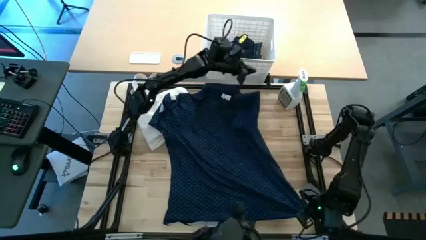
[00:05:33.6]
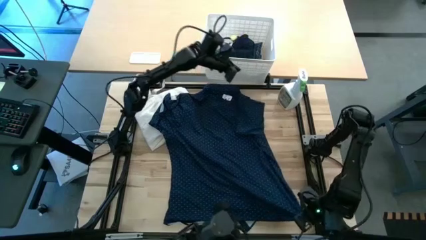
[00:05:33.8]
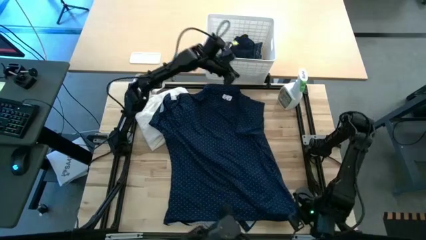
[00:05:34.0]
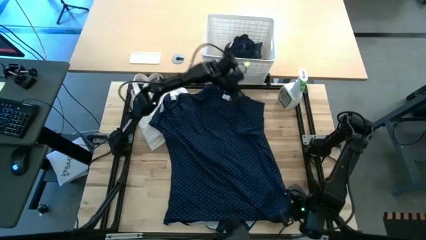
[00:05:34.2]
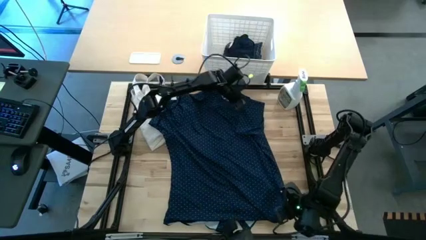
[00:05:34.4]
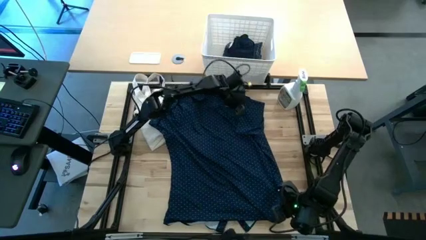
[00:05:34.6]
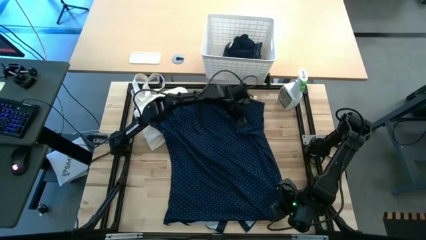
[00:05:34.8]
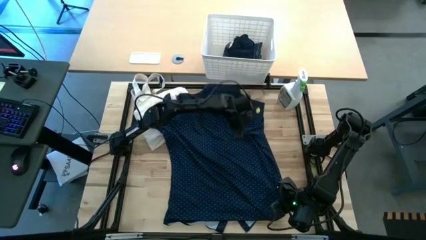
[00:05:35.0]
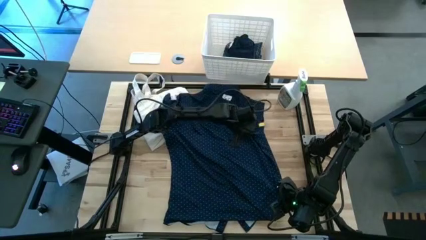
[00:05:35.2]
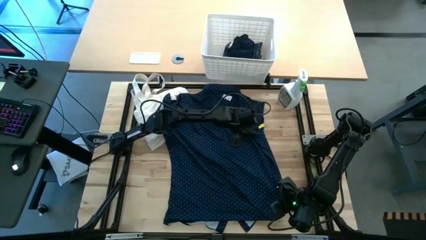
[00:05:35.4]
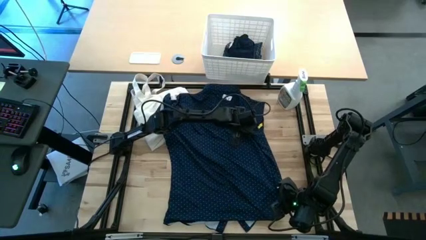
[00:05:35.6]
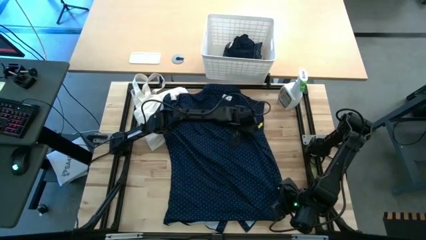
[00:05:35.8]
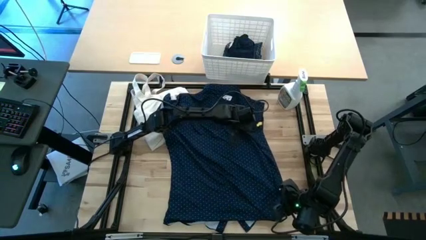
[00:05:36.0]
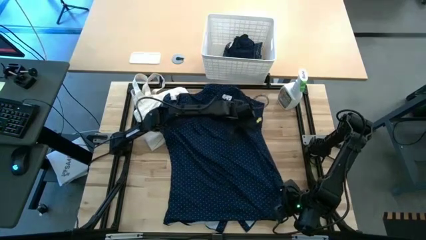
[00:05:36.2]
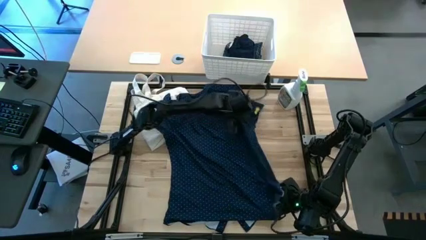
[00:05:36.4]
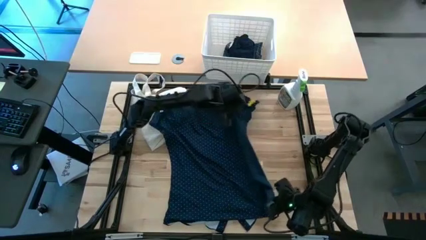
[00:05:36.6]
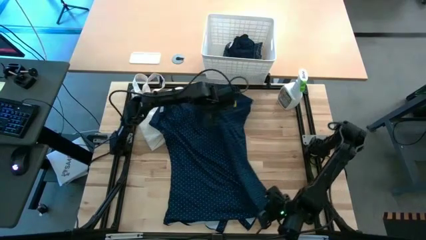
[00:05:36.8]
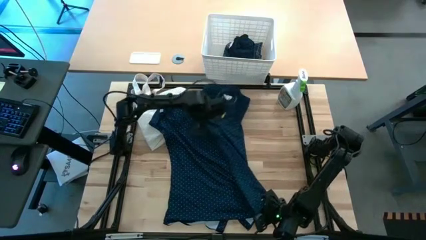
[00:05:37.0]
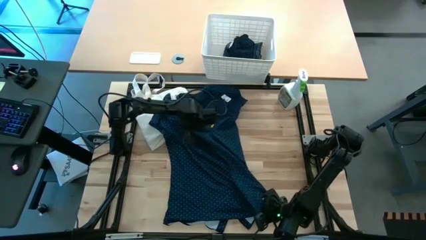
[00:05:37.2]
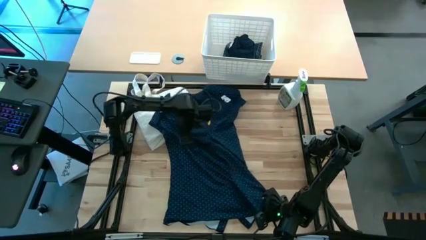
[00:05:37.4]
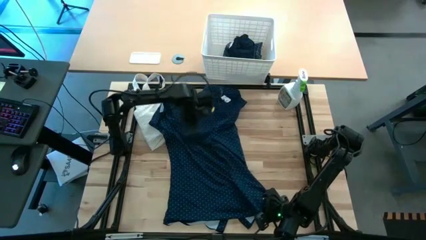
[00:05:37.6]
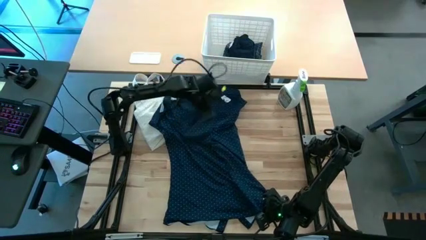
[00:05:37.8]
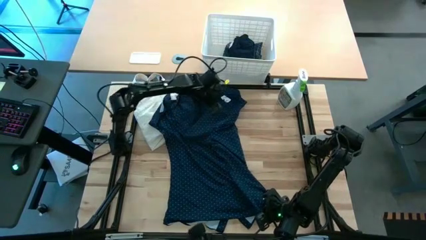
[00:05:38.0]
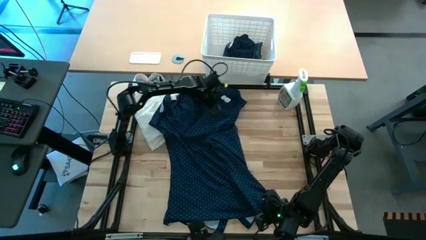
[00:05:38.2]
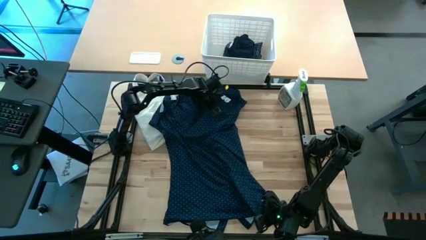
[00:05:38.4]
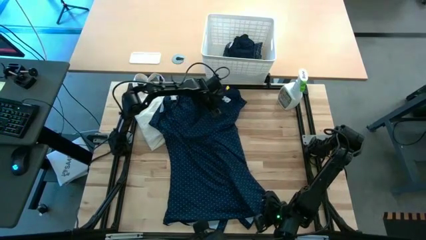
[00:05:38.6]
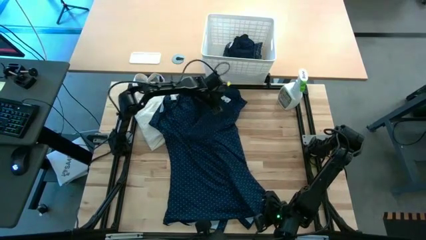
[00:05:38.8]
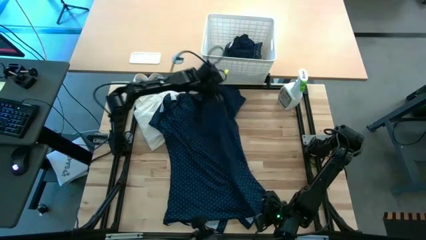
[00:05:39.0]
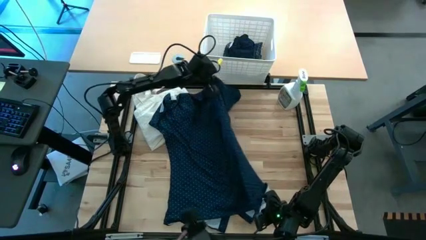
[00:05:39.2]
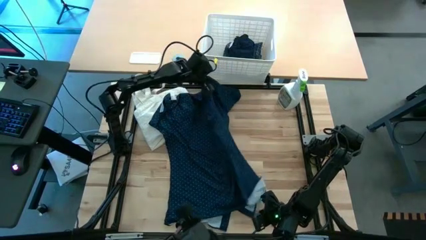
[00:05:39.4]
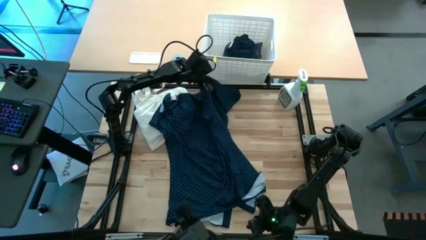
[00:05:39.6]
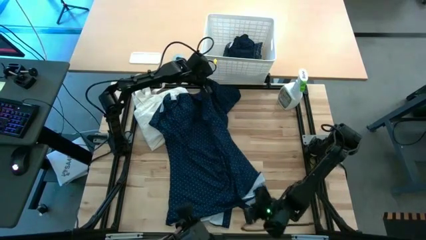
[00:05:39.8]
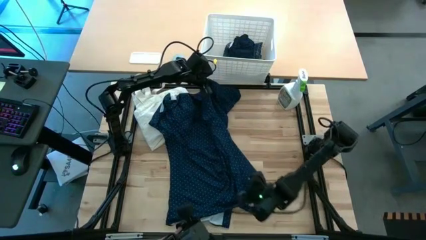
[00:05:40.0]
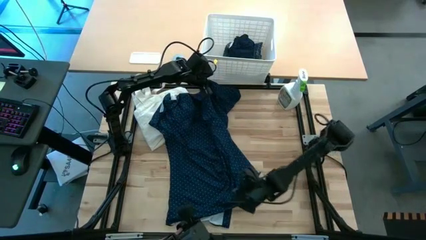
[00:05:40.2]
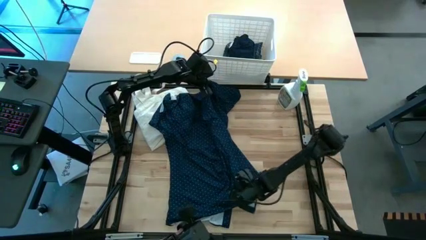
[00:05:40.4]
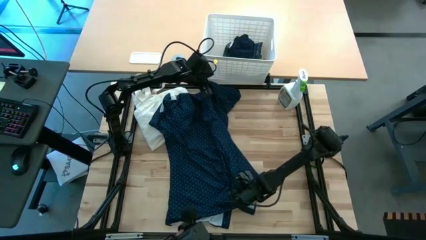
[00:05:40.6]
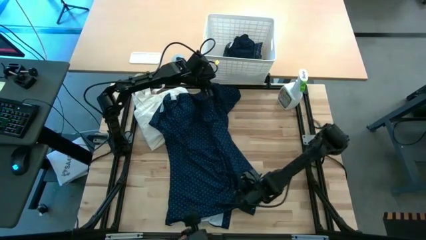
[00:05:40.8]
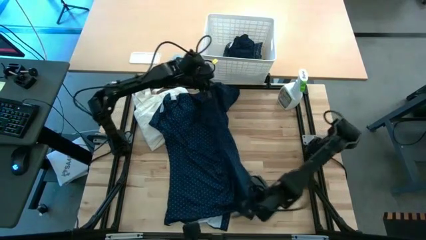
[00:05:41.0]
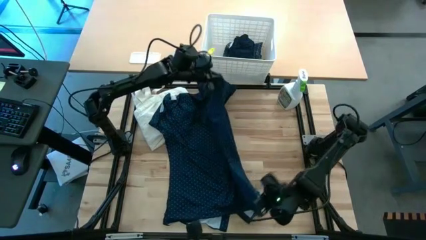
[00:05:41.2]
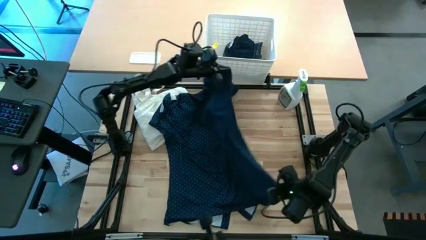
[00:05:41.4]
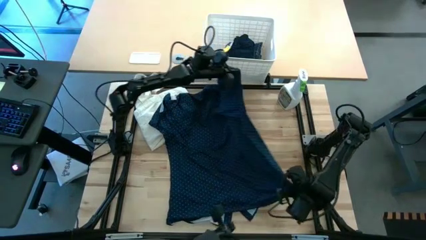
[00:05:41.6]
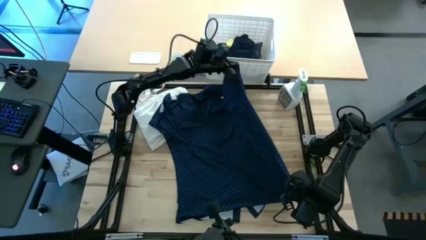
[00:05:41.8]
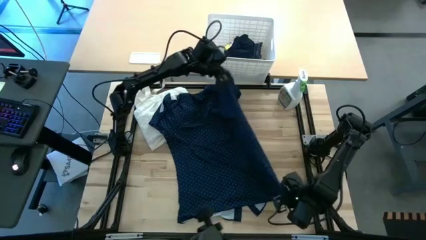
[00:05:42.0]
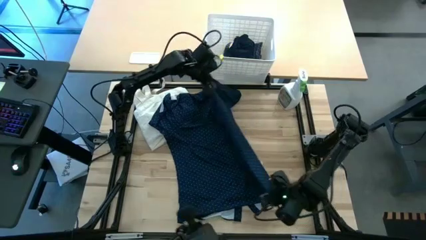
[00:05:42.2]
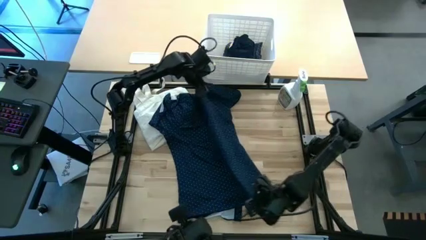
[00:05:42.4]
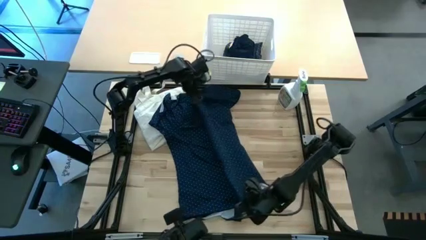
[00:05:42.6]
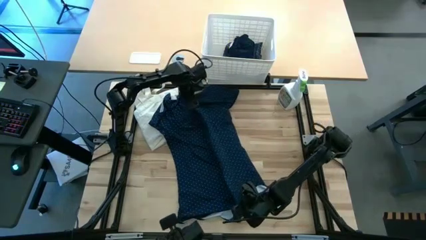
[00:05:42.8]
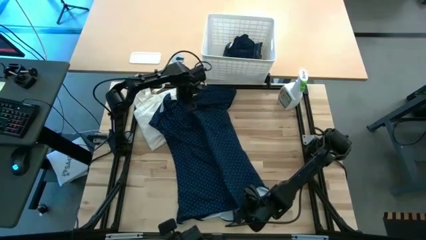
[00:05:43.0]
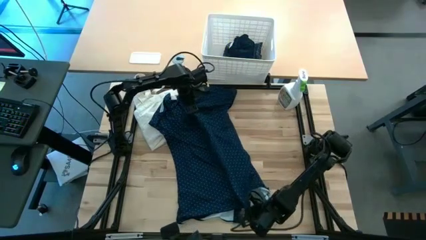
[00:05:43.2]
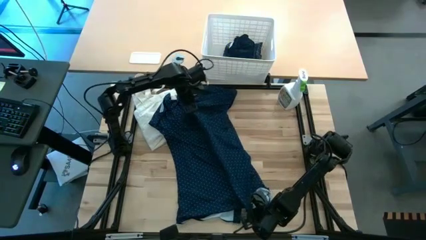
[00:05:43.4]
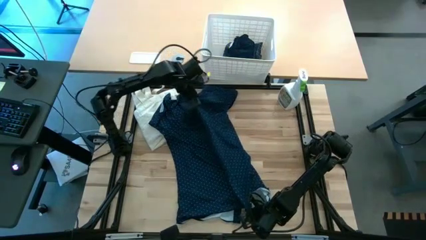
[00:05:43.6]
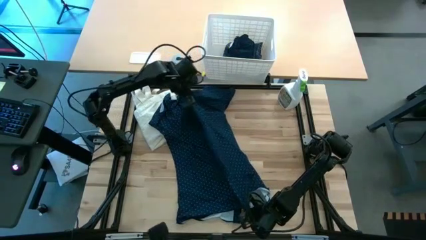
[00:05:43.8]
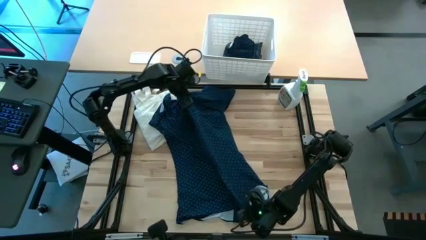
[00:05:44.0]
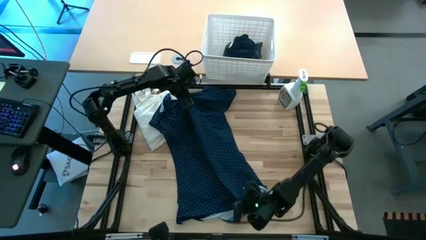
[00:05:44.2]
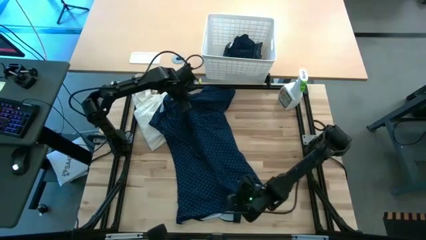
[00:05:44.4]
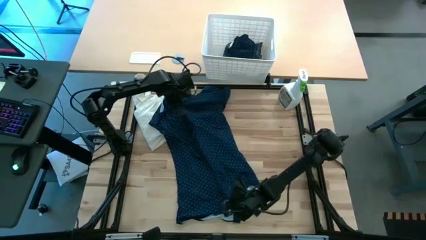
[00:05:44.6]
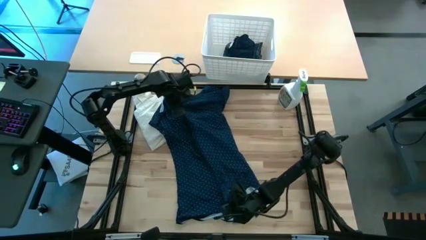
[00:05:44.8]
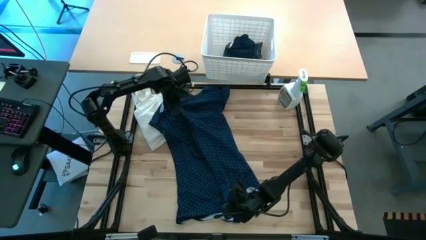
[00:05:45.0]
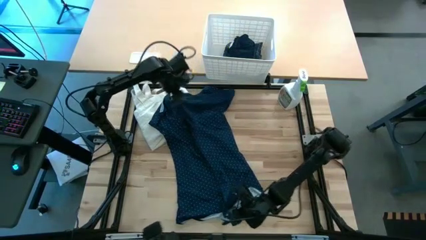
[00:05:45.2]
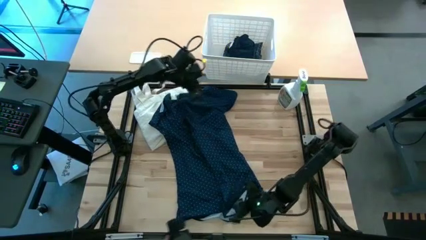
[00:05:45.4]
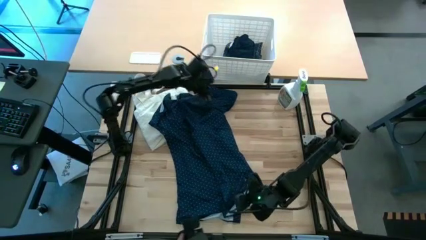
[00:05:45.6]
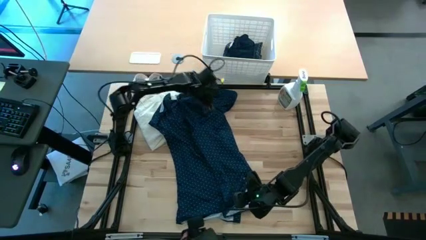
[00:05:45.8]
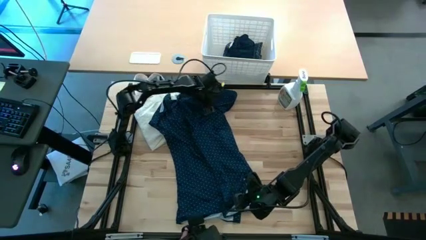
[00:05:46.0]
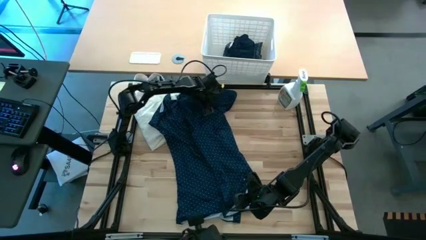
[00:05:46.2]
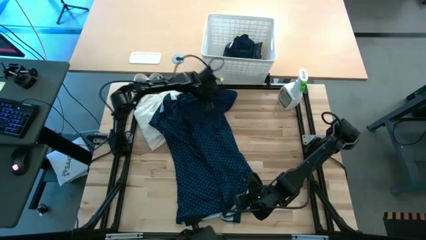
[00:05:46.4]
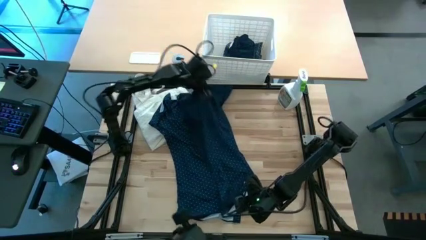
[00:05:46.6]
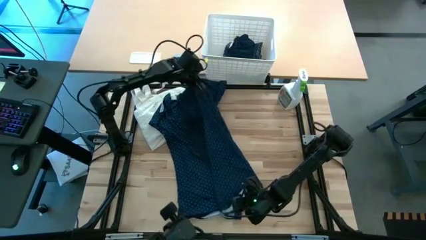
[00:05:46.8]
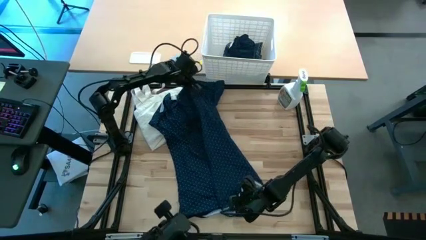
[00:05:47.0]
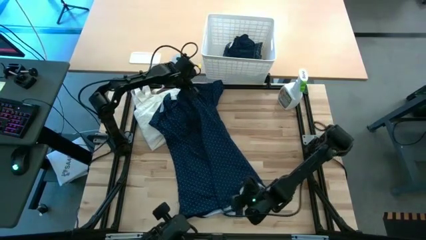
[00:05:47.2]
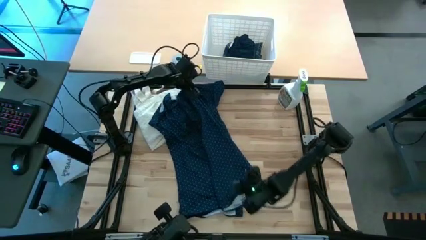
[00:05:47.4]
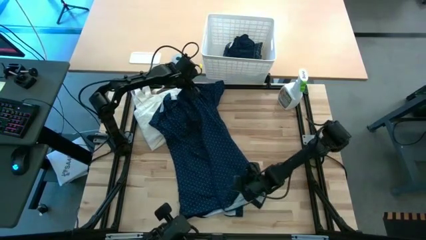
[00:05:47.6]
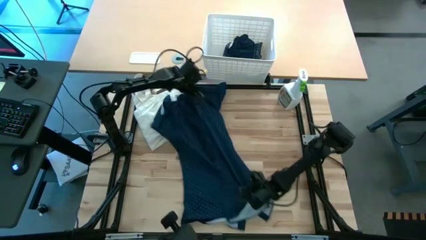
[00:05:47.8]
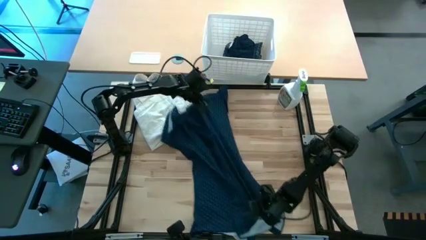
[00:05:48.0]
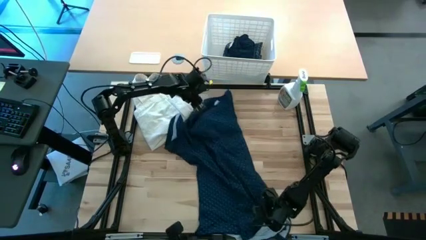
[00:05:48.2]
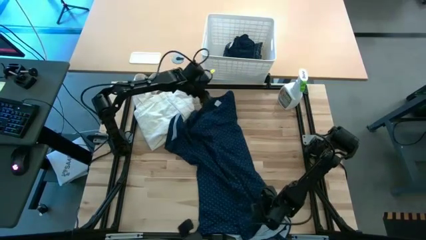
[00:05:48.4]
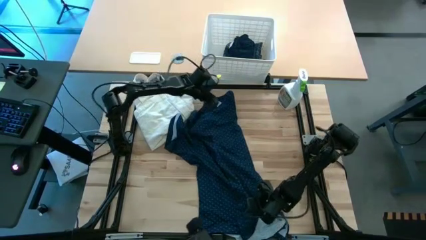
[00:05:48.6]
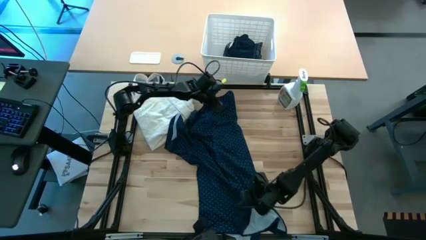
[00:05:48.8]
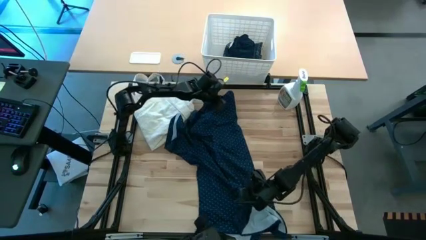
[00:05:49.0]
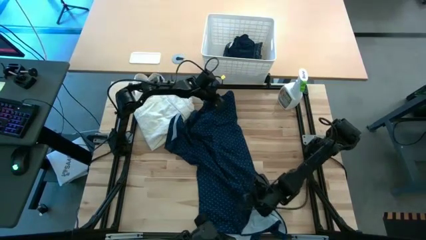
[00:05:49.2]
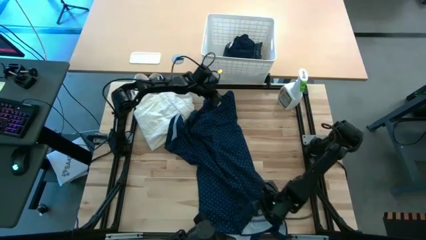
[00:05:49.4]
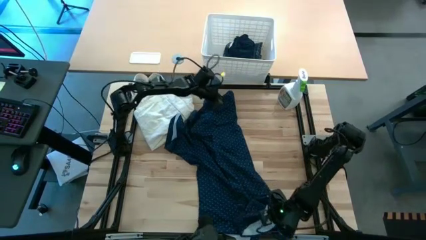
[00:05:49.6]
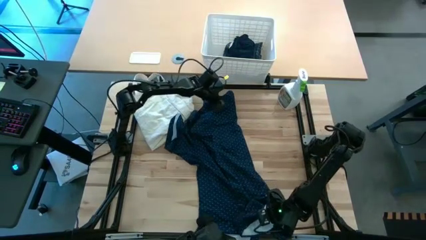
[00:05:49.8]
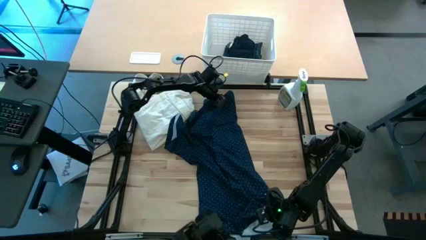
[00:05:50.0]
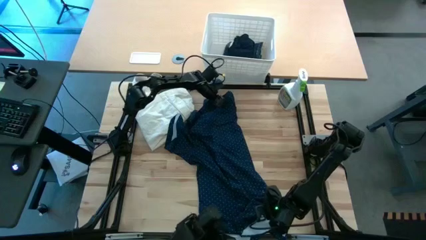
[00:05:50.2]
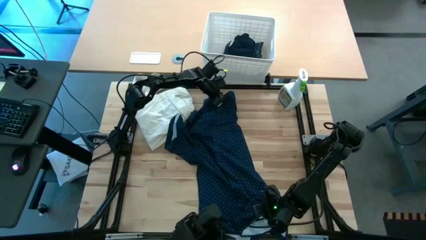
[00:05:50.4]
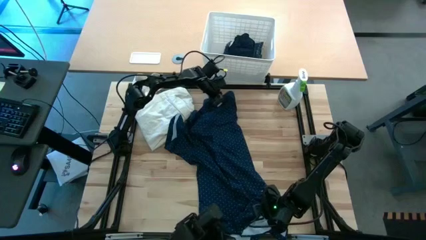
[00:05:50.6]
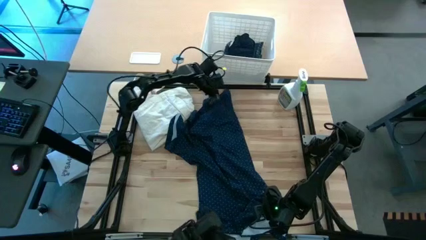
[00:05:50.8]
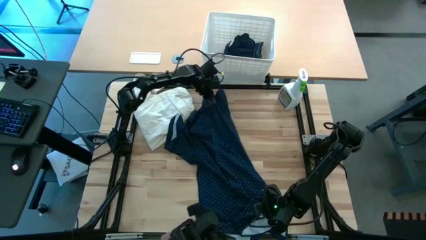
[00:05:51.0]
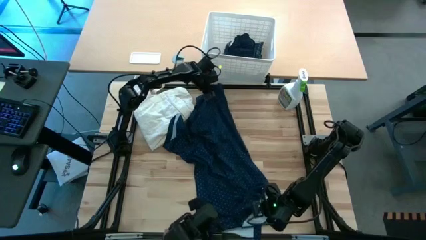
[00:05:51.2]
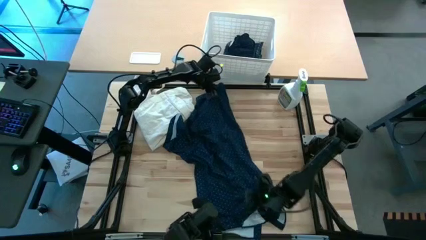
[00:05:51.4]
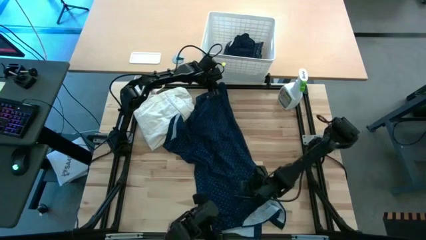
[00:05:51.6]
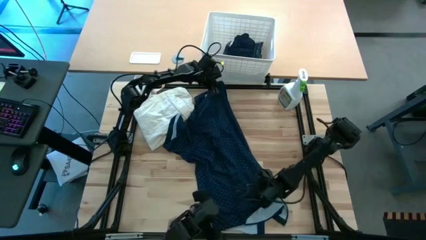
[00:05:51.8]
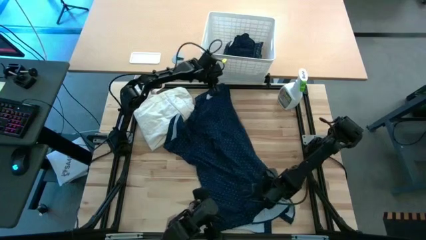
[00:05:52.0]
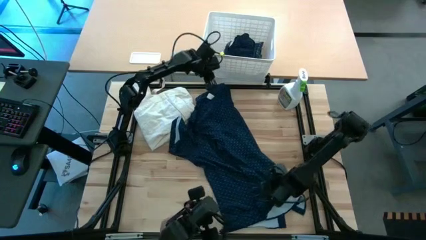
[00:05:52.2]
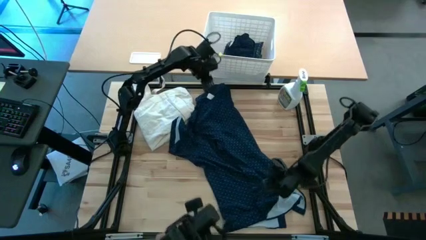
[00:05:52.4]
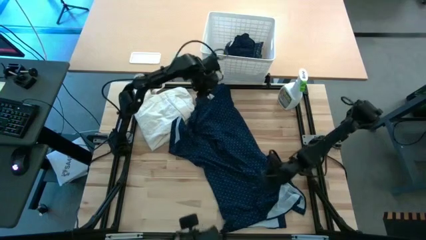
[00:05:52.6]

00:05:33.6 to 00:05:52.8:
Fold the blue polo shirt
